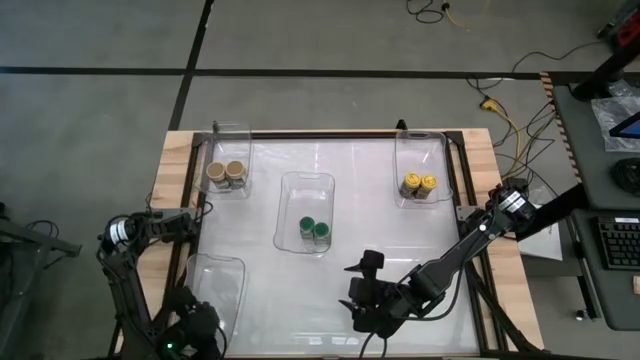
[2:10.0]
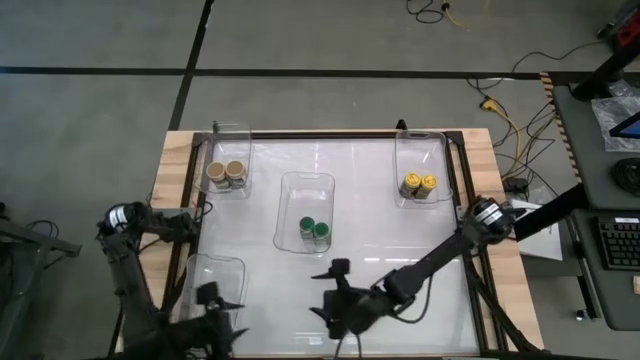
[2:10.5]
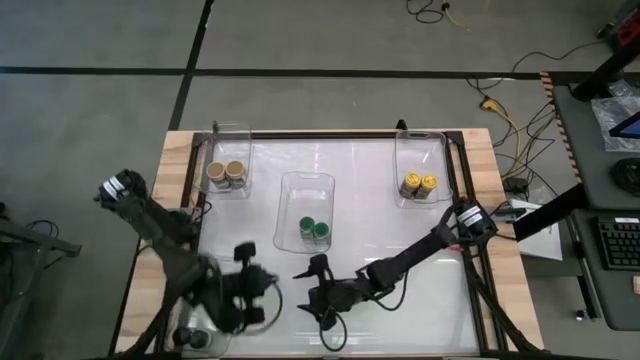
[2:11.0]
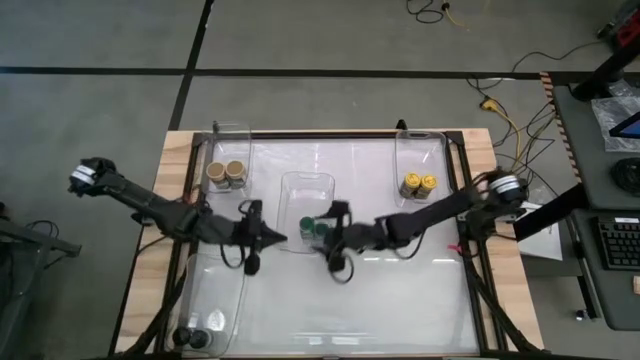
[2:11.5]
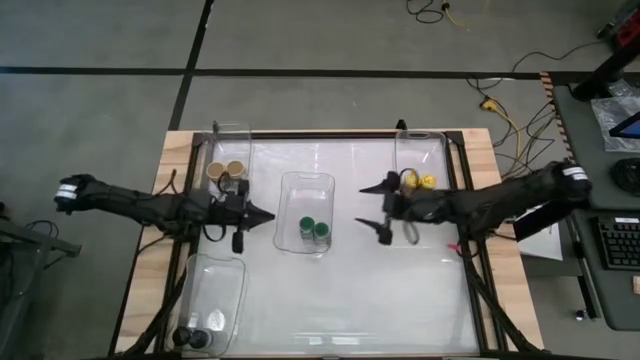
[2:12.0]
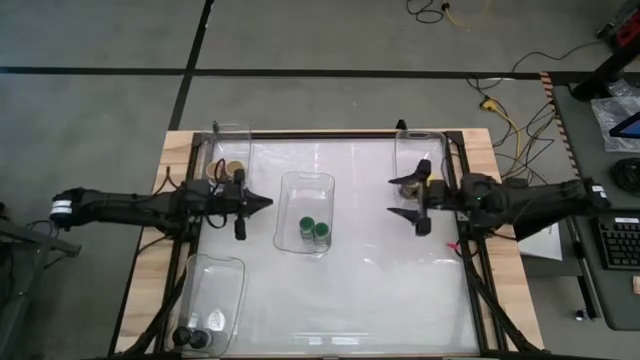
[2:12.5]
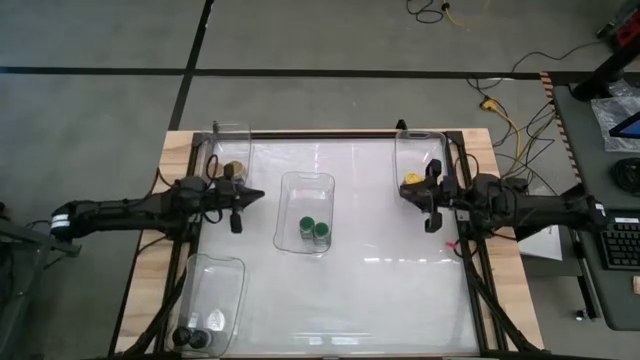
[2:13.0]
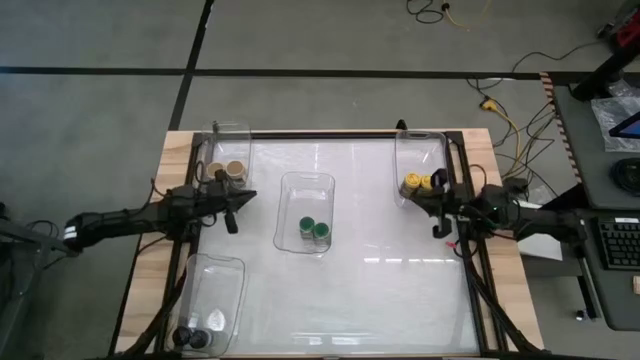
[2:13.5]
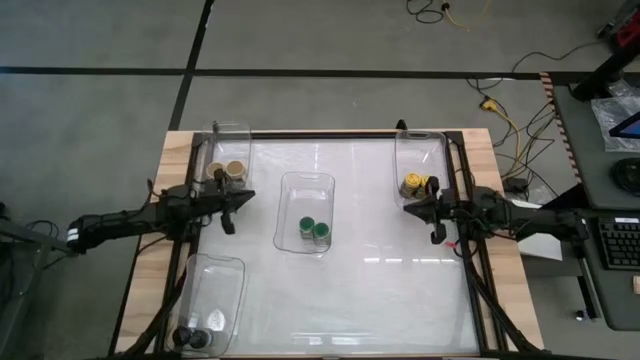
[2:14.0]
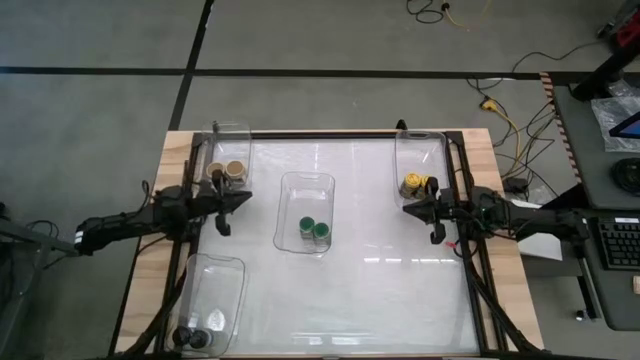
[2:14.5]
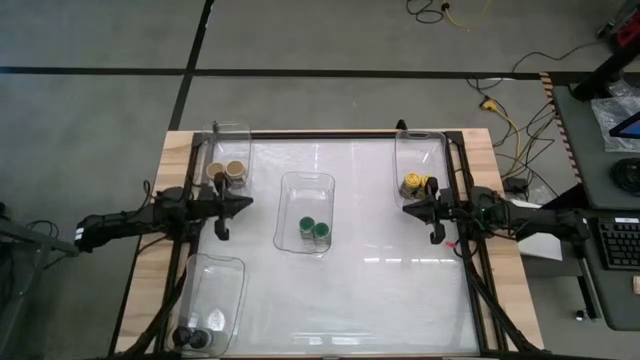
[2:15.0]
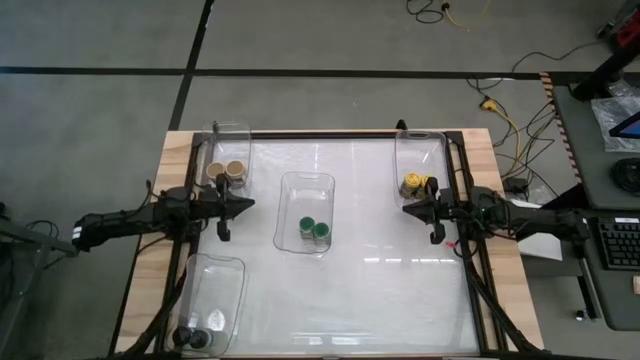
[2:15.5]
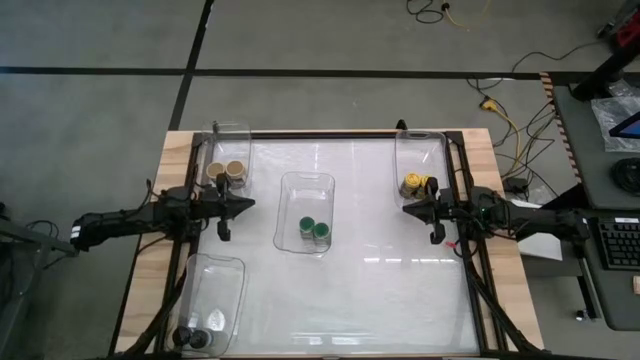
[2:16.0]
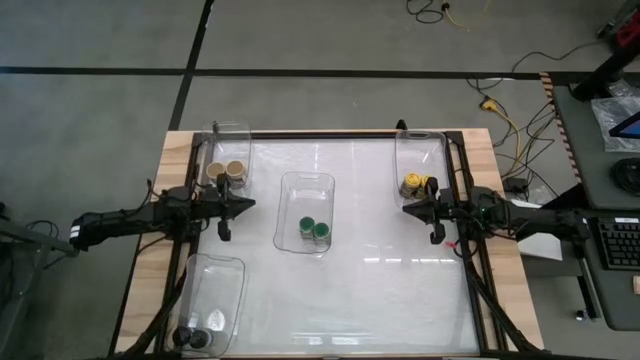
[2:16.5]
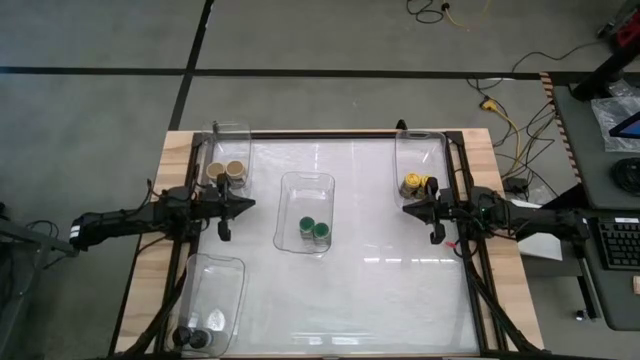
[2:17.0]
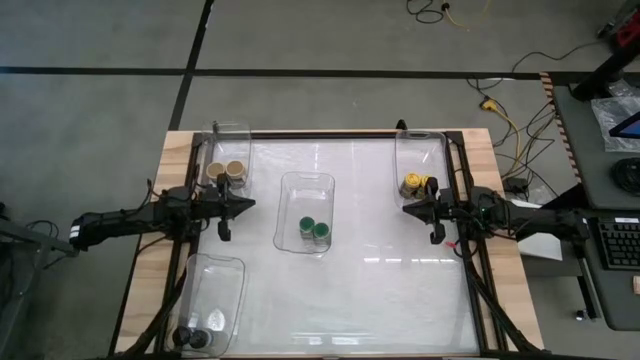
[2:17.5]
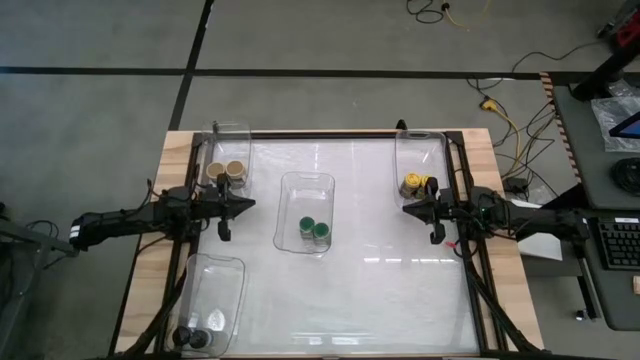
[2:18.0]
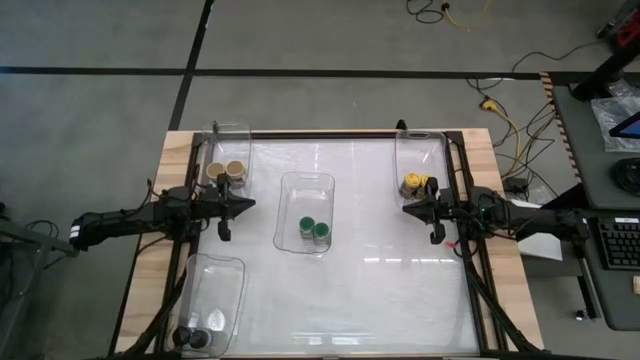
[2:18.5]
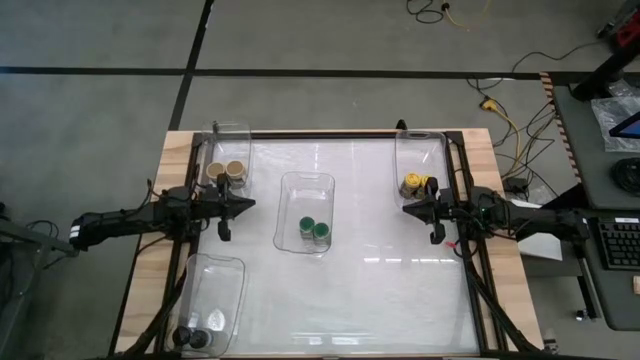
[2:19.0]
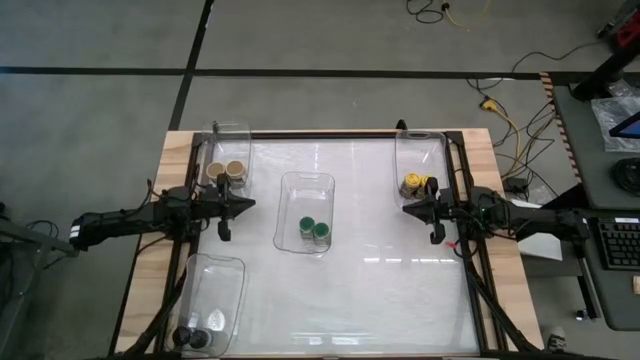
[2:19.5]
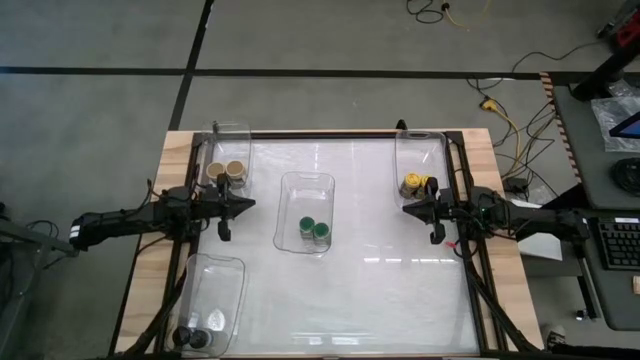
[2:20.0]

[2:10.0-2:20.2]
Task: Sort spices by type
Return to Home Position

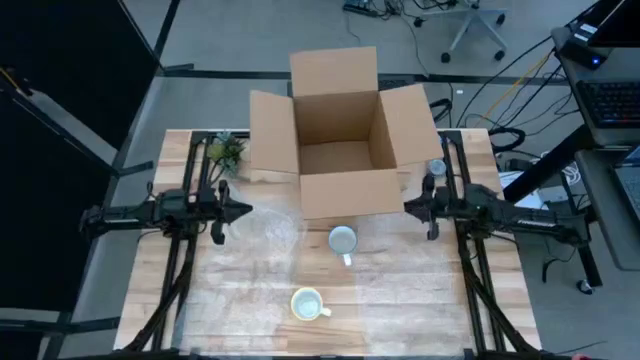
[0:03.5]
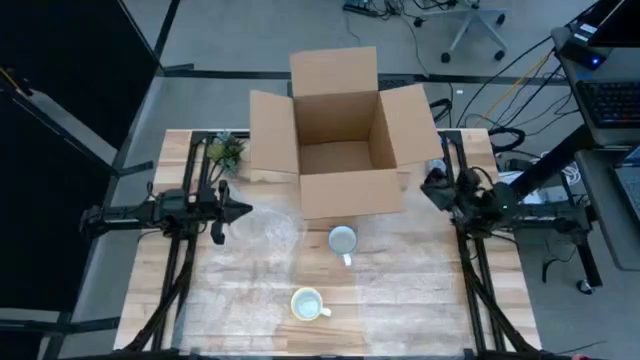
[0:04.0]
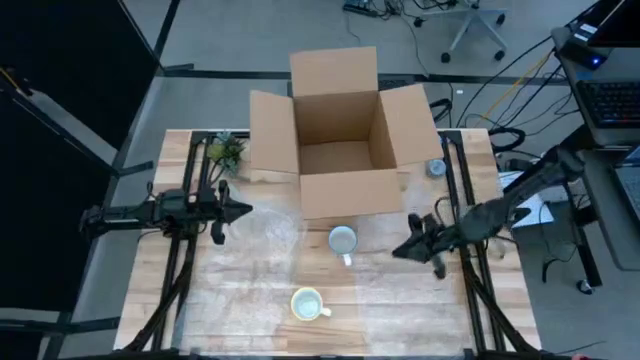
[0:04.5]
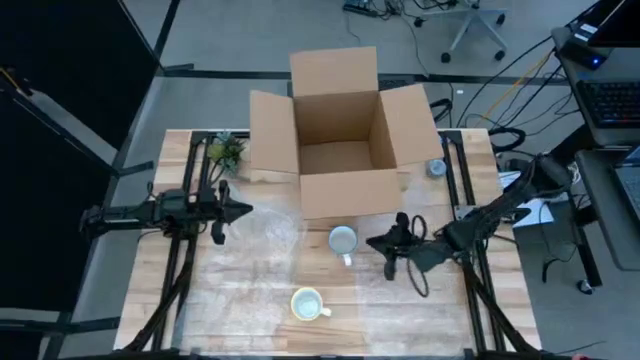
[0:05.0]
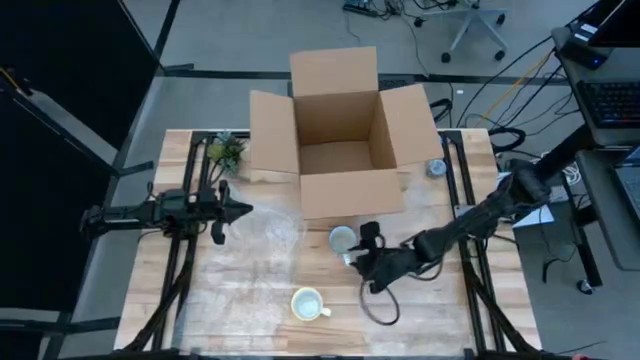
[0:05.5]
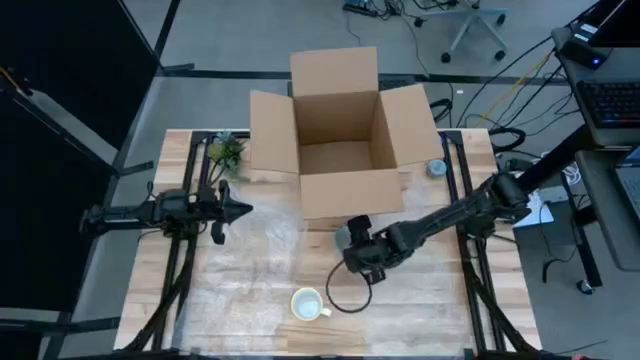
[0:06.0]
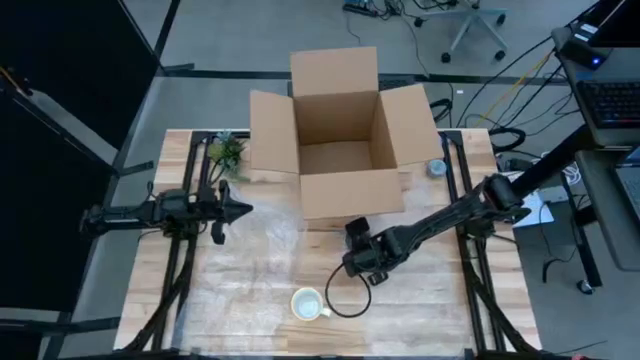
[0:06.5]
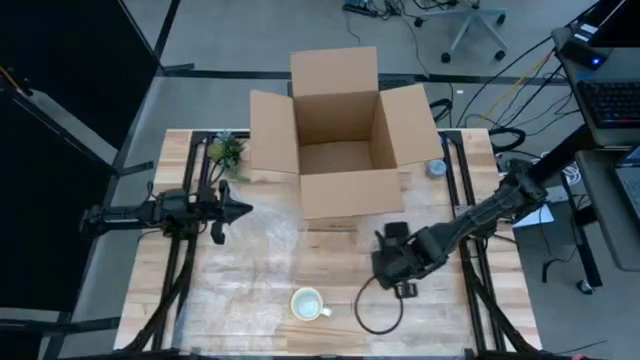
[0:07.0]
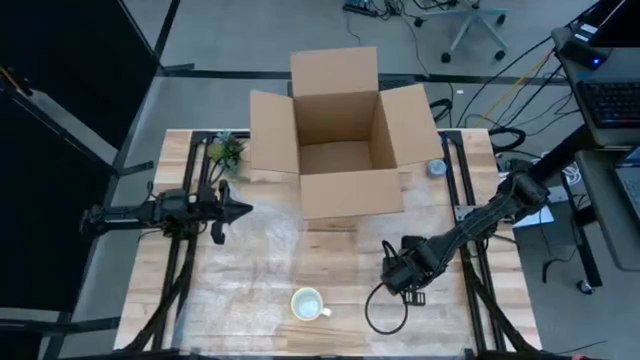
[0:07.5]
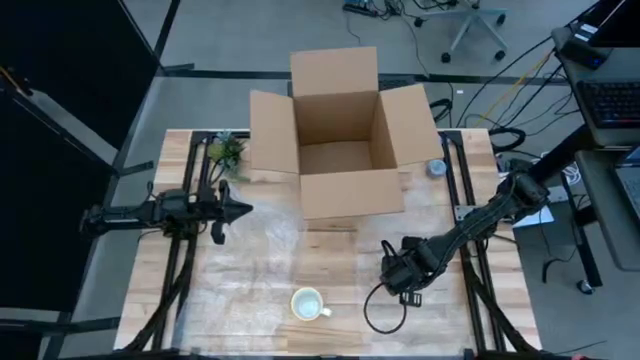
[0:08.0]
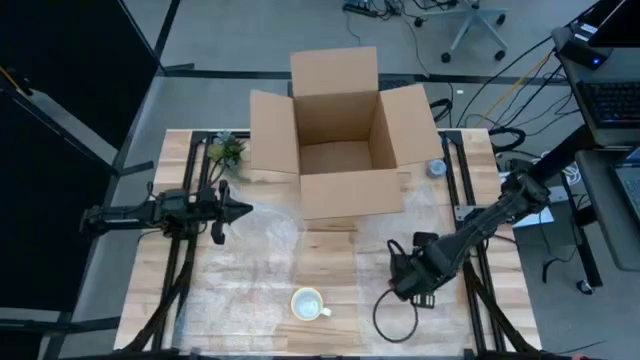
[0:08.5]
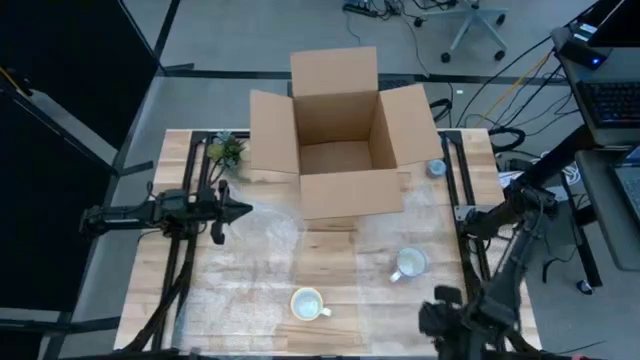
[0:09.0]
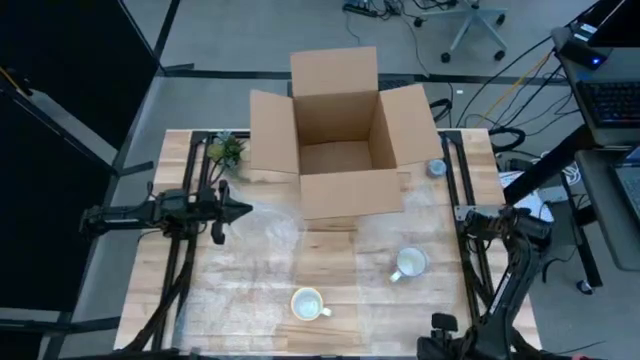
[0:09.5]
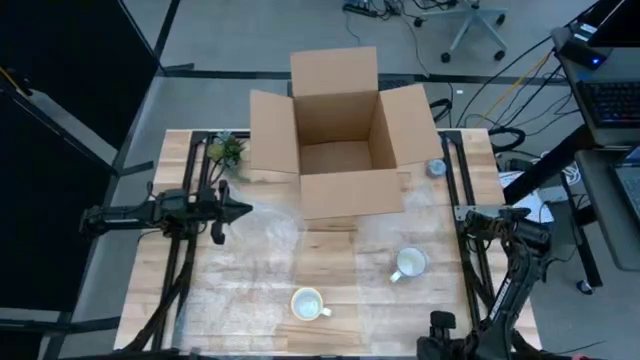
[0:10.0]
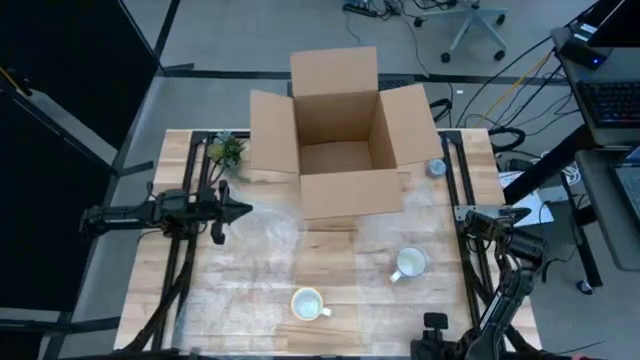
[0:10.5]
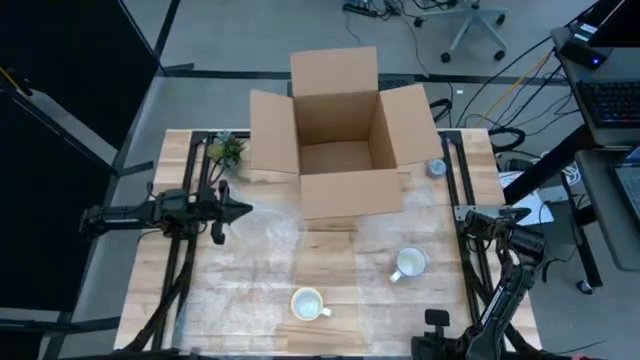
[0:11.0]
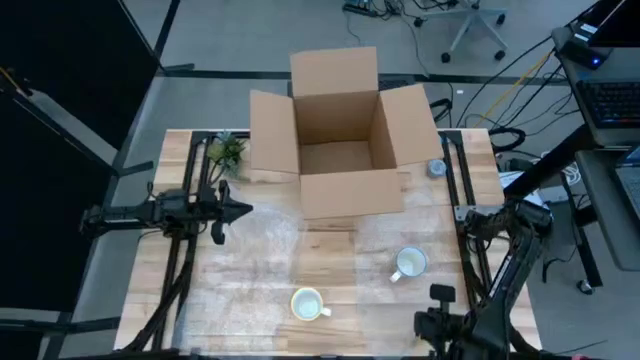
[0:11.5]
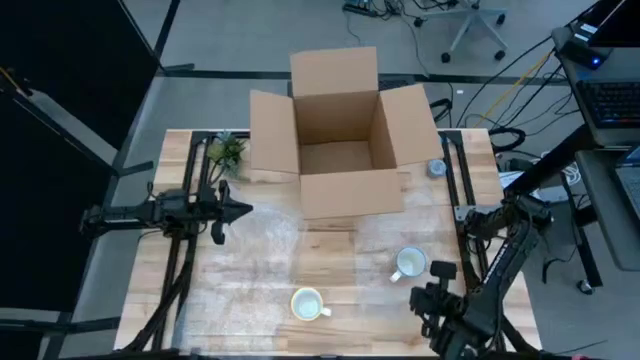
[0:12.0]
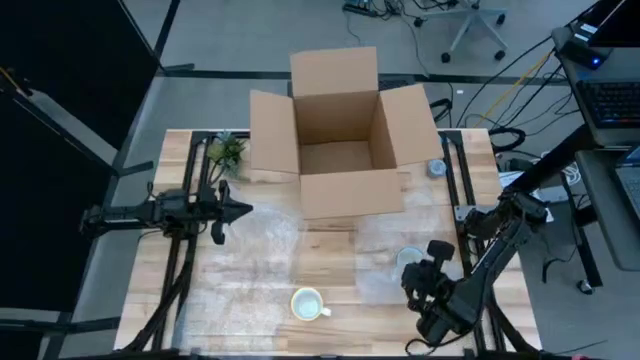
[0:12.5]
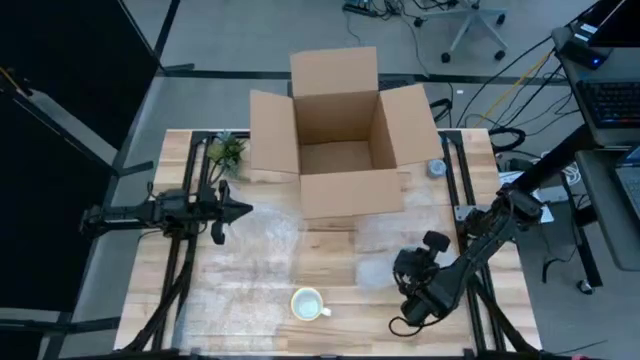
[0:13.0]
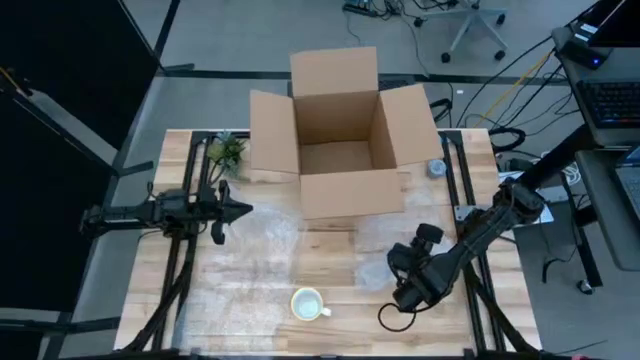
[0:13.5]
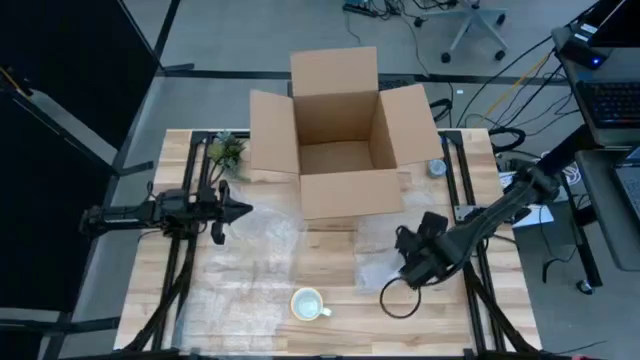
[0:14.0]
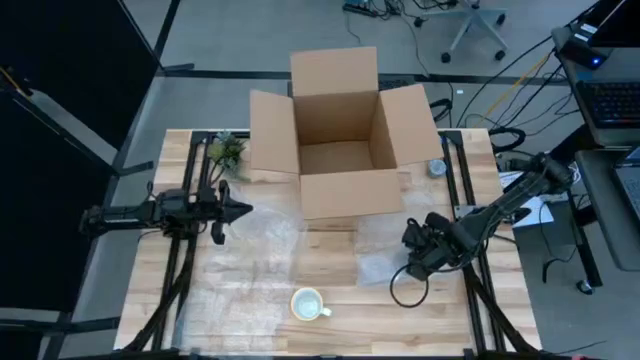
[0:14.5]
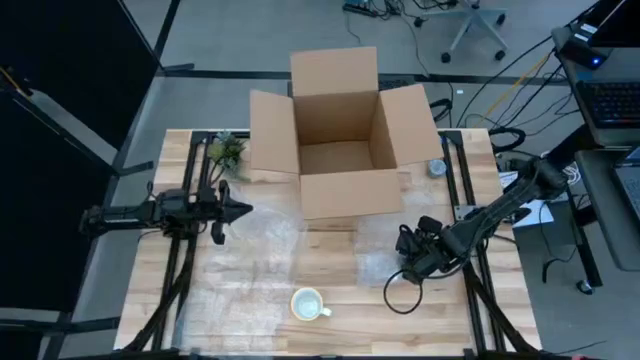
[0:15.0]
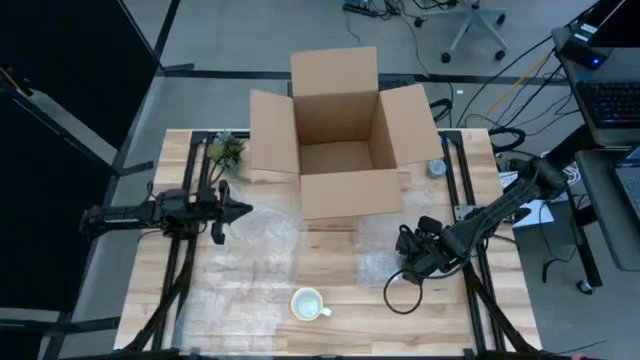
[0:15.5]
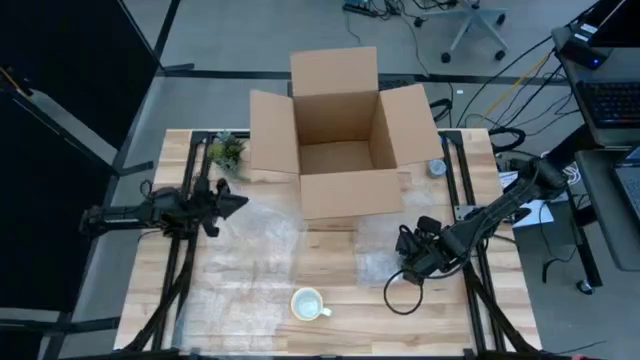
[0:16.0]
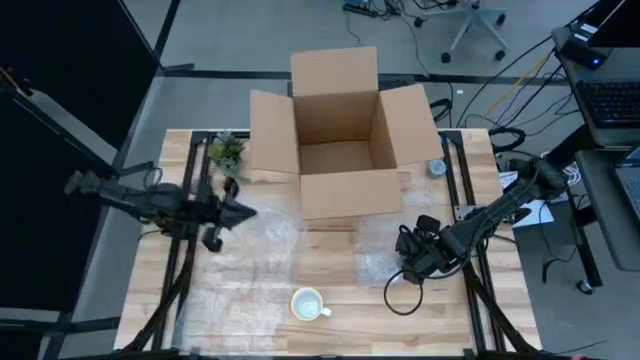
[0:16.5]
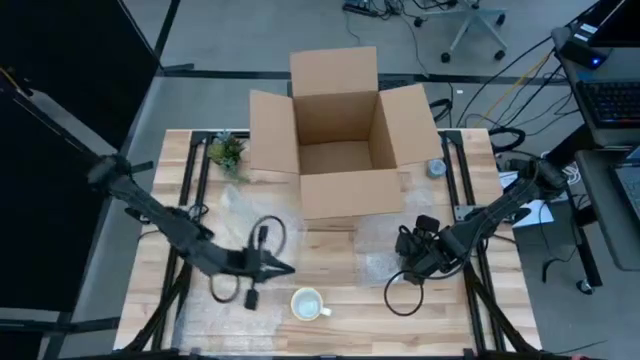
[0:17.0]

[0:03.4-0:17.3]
Task: wrap mug
Wrap the red mug with bubble wrap
